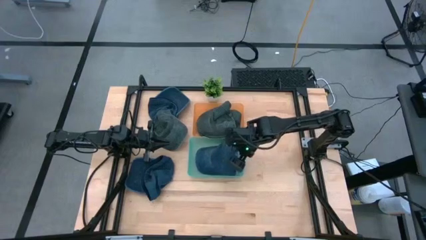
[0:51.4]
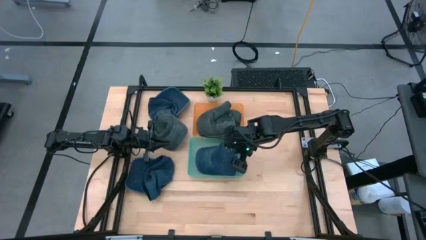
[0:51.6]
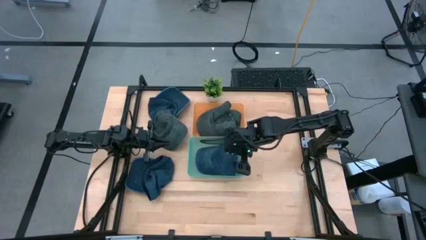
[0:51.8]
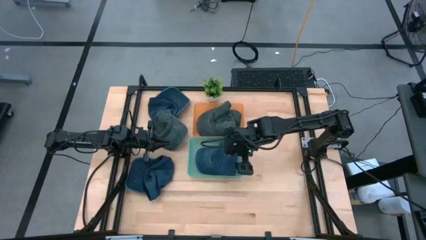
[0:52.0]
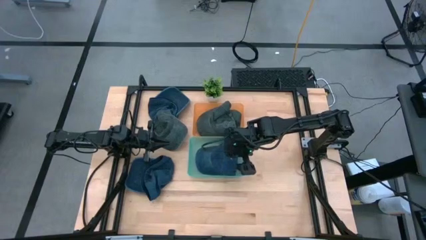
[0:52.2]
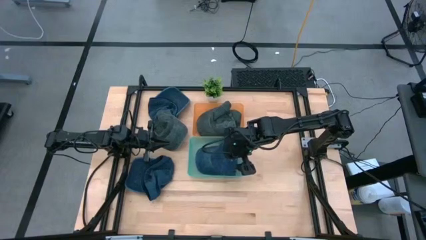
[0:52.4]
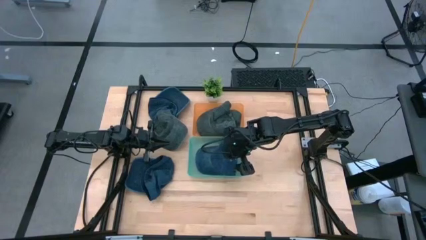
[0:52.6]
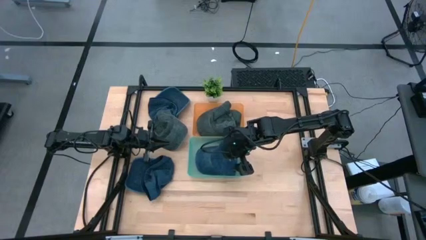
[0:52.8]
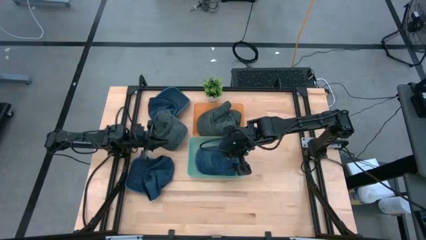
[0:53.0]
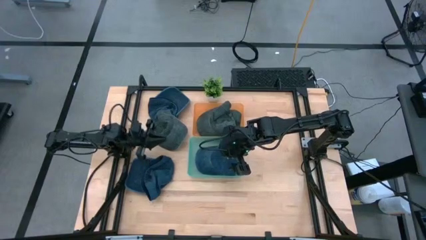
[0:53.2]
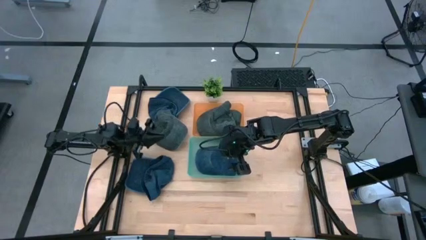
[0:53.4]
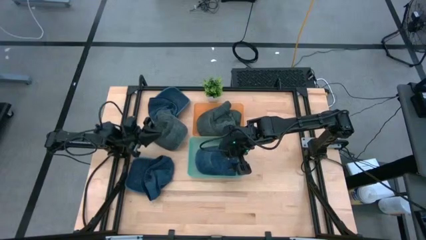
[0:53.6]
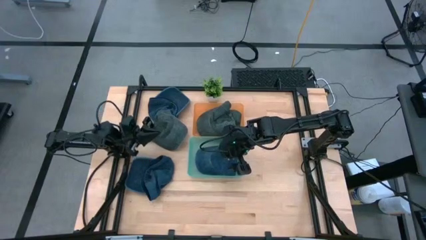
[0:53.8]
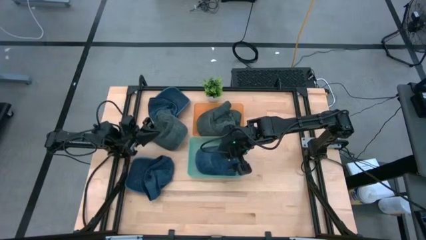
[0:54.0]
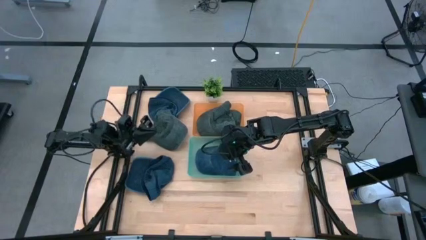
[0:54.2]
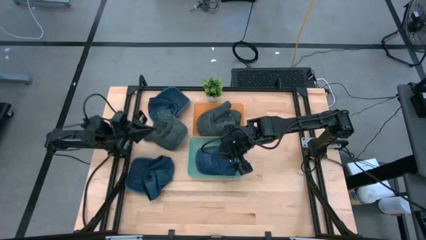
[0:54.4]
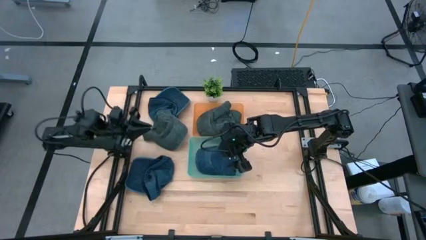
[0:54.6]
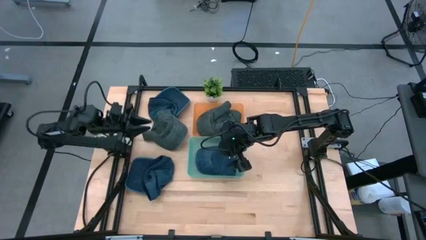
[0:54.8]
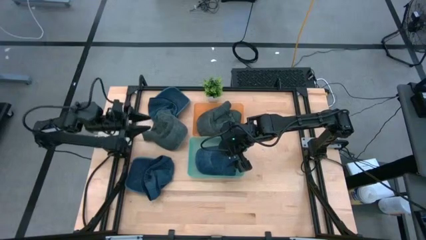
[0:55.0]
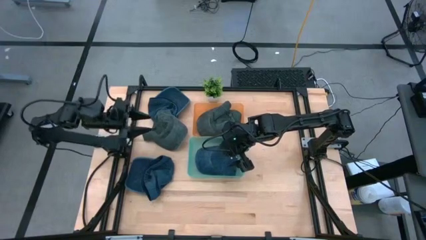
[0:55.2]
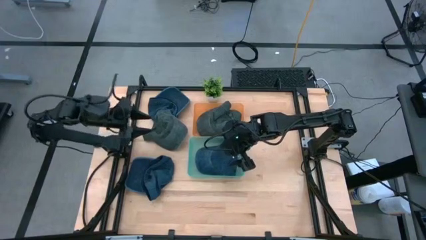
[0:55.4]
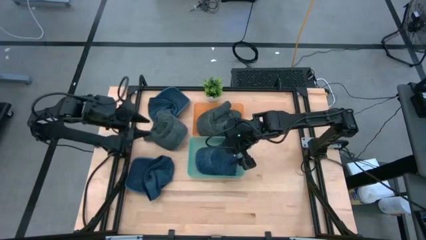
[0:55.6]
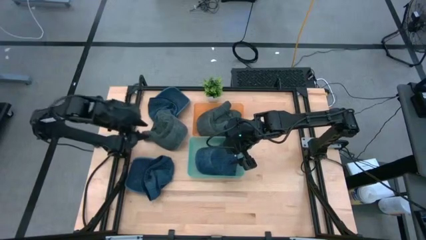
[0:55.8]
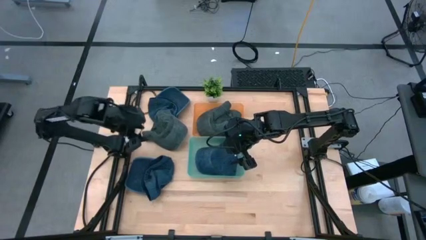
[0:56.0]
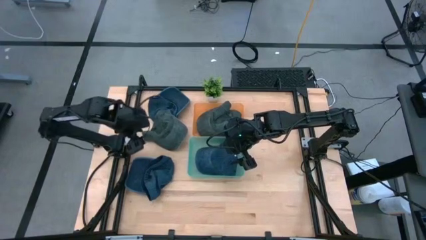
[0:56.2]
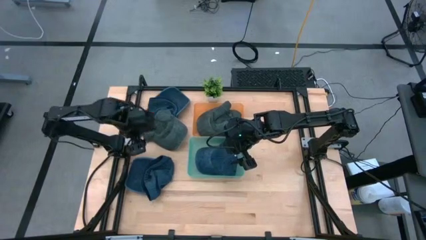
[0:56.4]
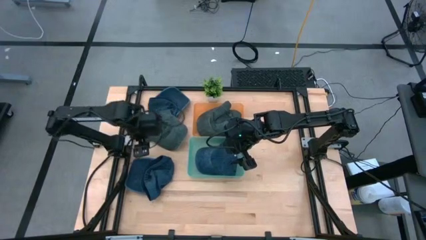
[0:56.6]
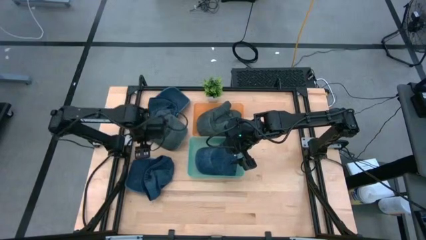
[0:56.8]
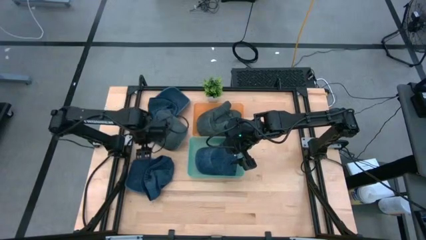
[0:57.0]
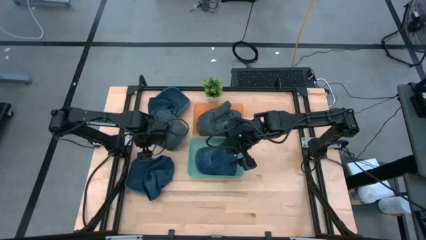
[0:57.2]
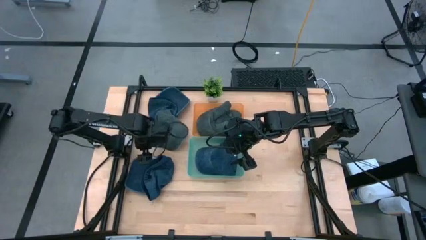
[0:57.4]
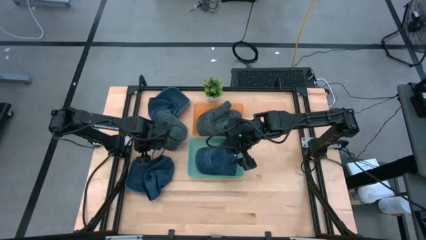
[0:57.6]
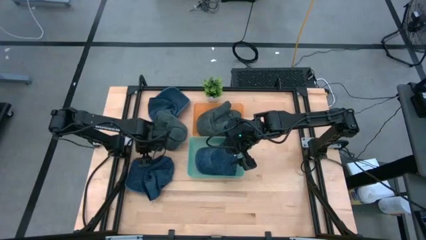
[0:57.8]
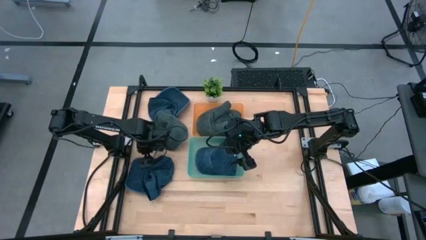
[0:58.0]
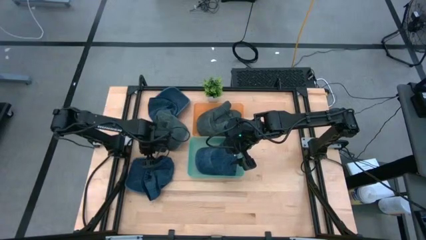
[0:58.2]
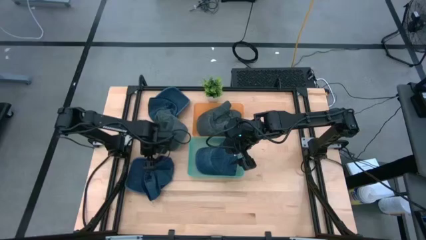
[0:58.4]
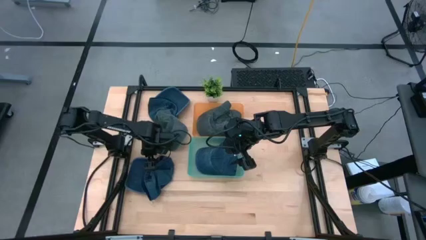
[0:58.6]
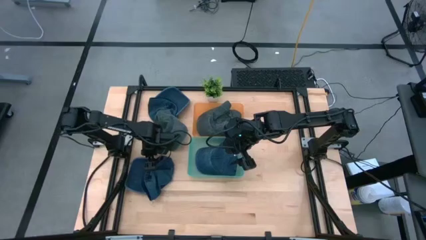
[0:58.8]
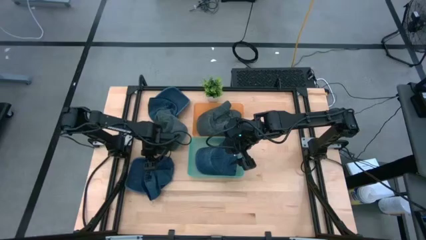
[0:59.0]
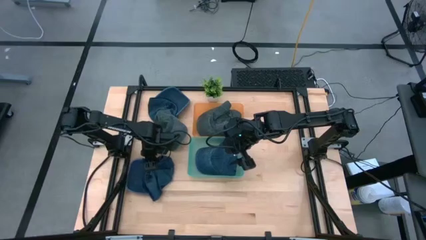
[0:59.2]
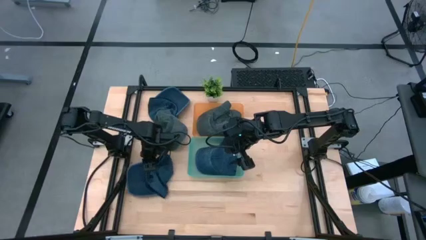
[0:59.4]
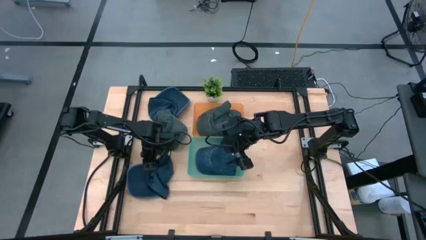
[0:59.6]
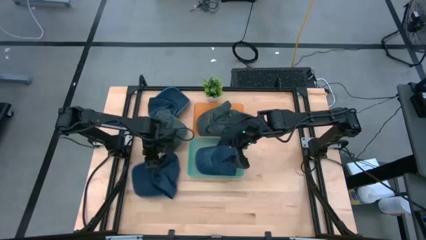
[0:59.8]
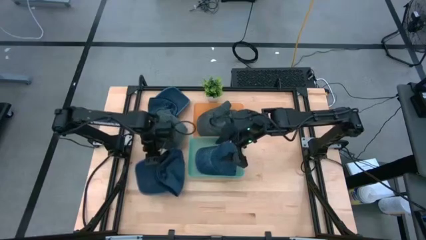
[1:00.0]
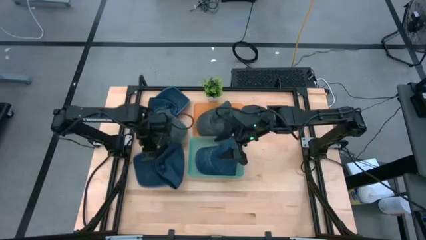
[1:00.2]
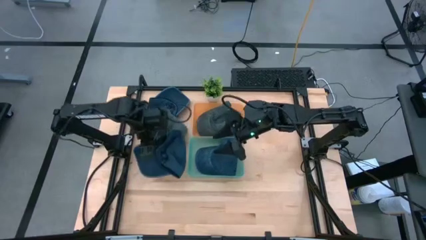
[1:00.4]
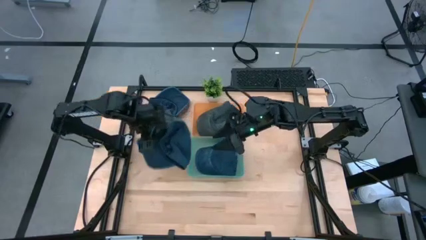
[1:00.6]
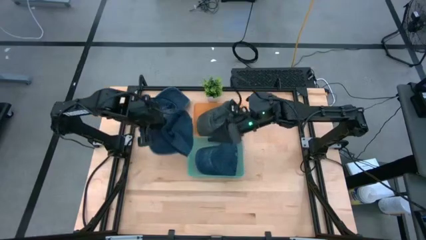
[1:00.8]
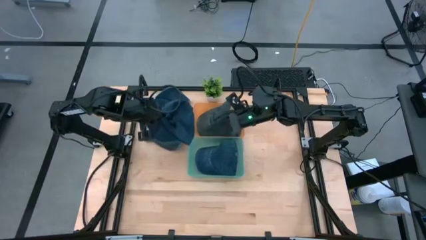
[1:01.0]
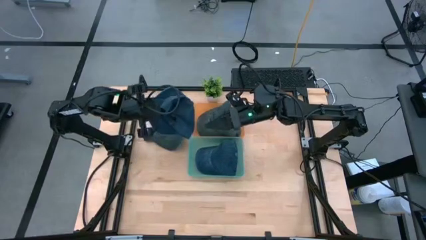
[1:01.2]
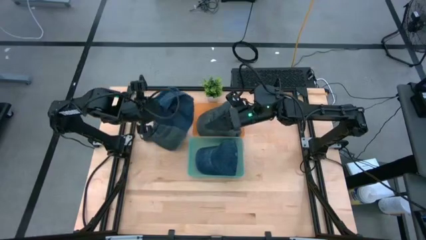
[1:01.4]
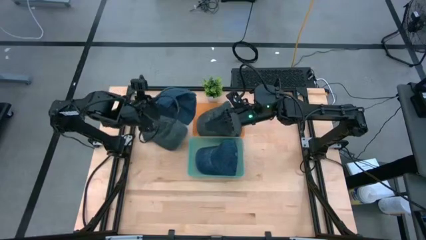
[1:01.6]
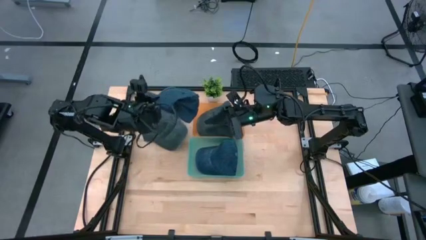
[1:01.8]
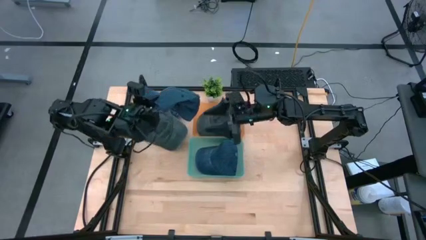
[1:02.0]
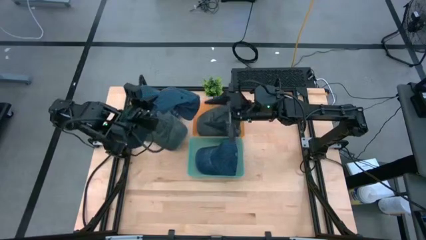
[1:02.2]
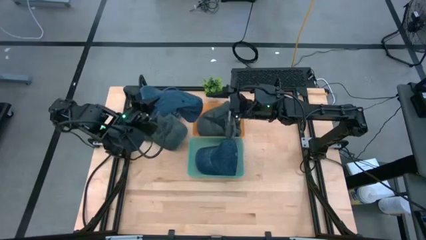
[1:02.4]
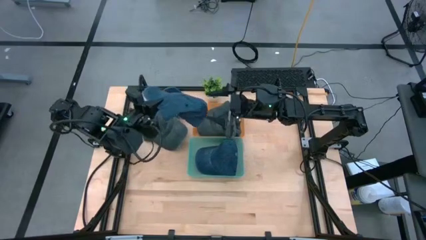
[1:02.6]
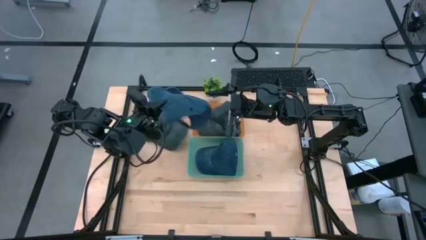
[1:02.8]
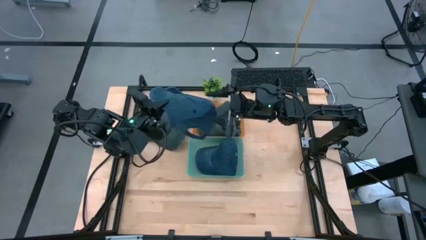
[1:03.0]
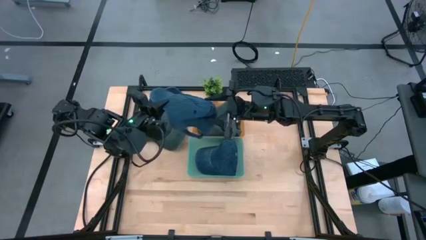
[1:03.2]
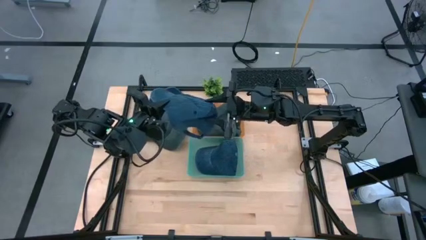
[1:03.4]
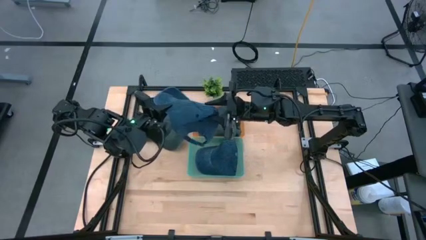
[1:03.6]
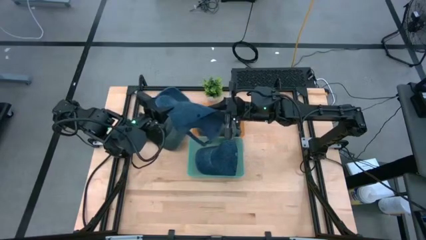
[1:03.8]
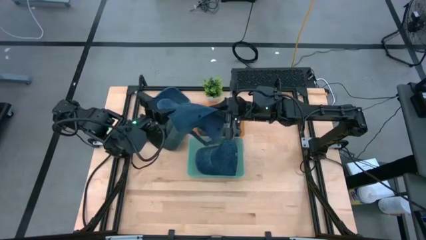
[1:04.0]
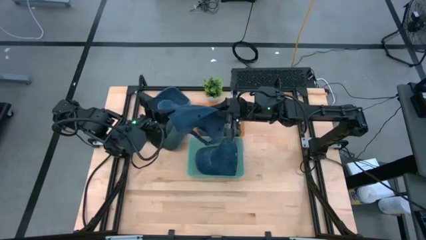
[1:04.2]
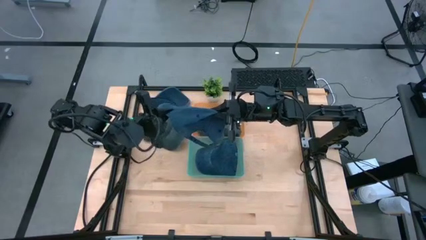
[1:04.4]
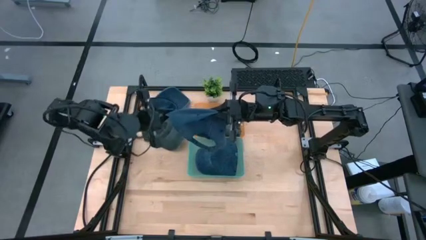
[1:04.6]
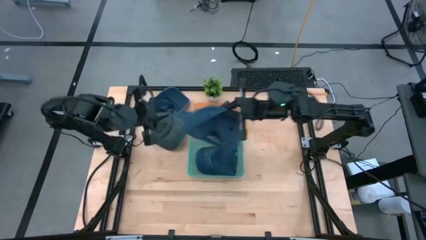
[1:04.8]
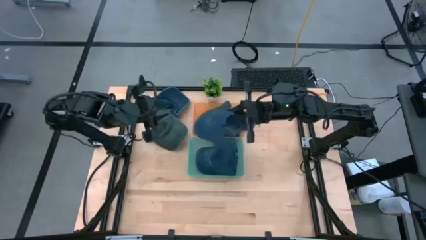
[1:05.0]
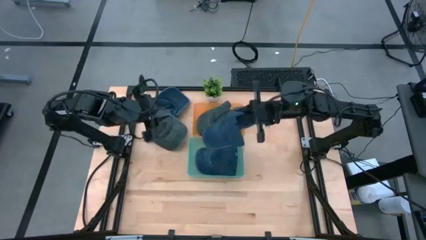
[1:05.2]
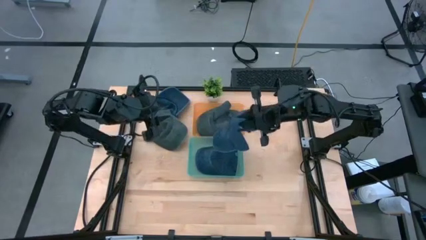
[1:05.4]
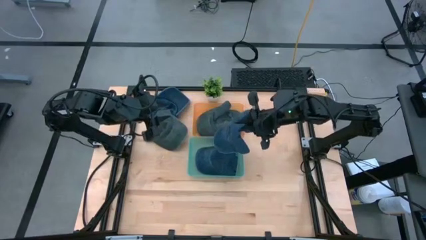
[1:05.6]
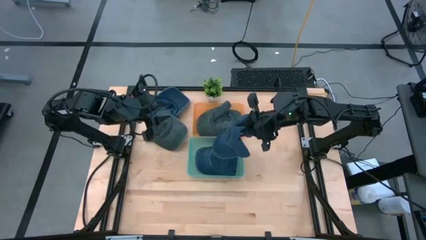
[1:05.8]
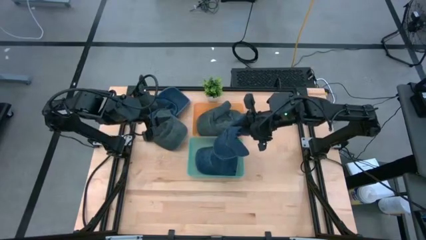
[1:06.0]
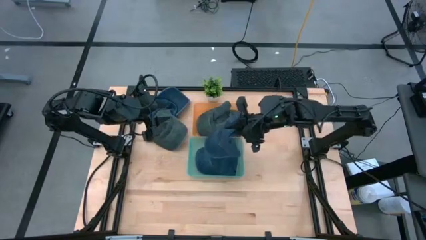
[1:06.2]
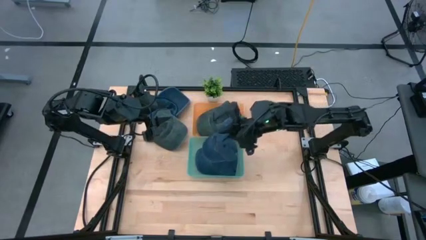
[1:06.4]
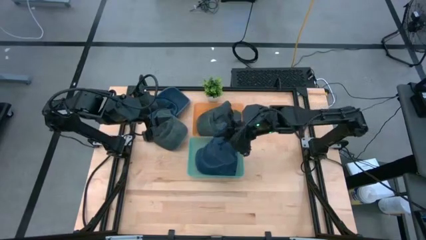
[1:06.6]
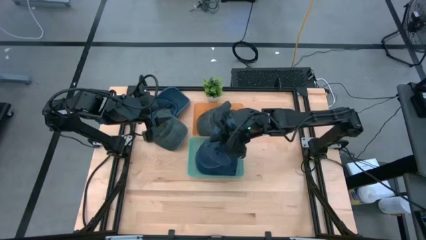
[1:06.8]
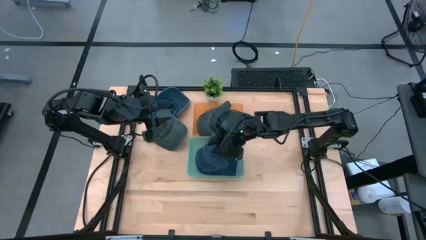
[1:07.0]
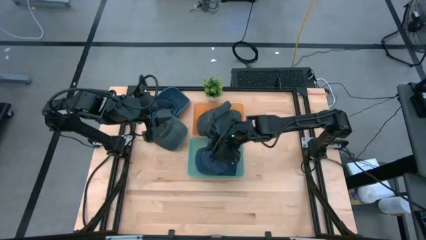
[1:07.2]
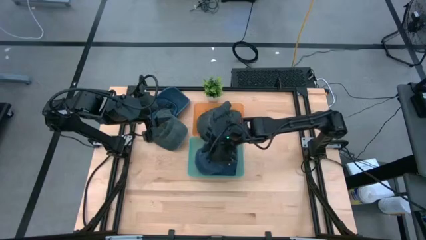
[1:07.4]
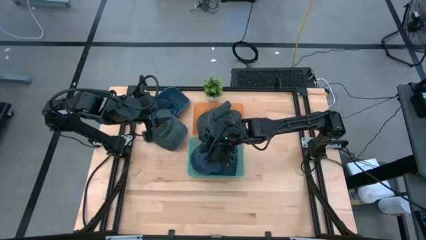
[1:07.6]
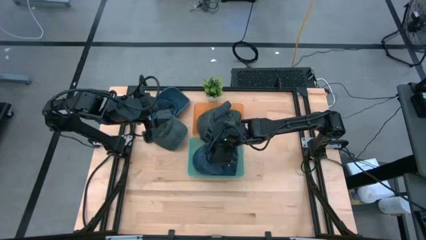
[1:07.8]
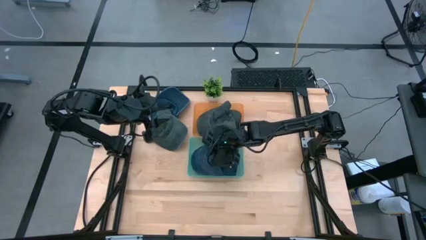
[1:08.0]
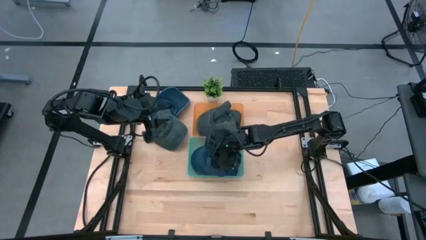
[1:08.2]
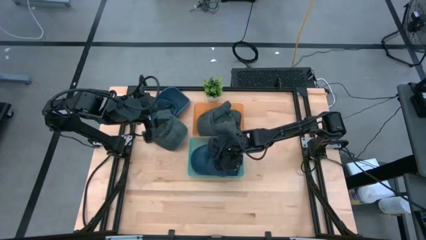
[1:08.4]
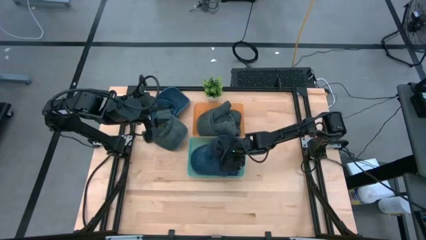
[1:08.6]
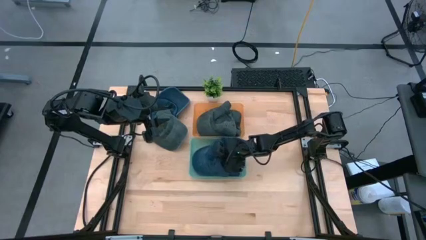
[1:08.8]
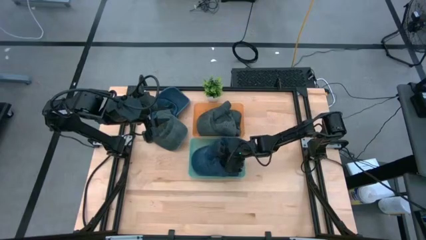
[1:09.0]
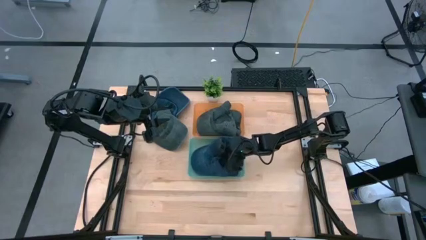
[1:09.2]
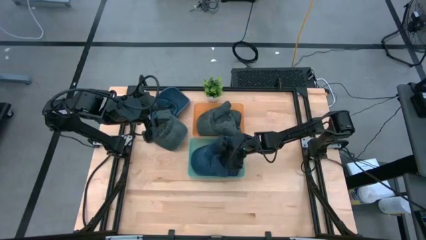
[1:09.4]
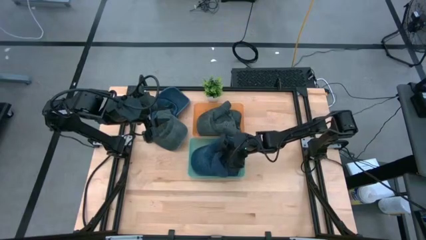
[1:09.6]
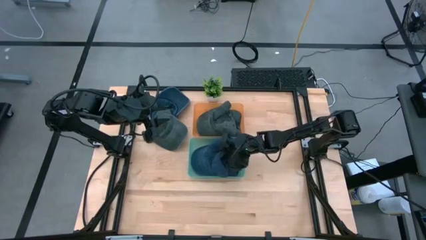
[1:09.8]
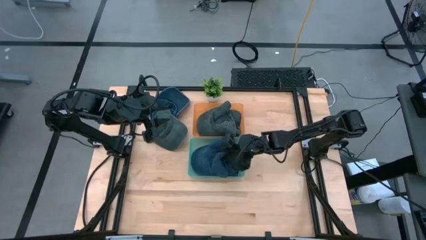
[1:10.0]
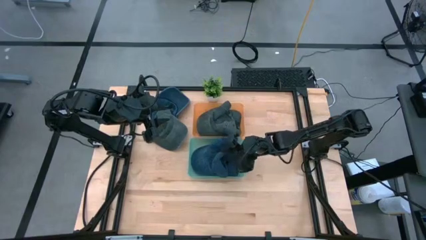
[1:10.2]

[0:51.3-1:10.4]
Task: Pick & Place hat
Put the bottom blue cap into the light blue bin
